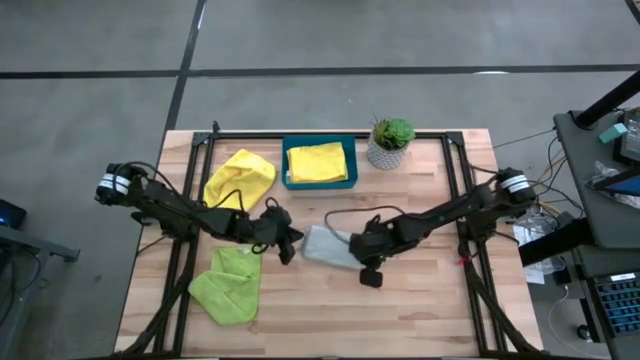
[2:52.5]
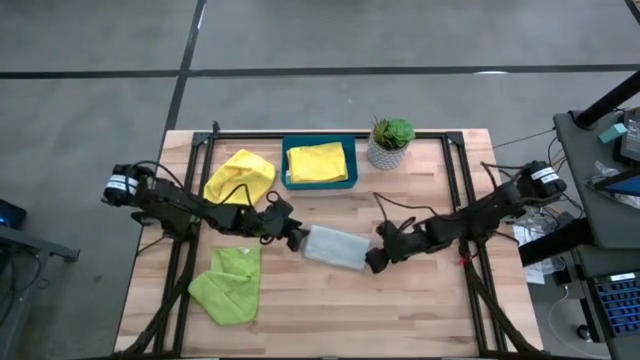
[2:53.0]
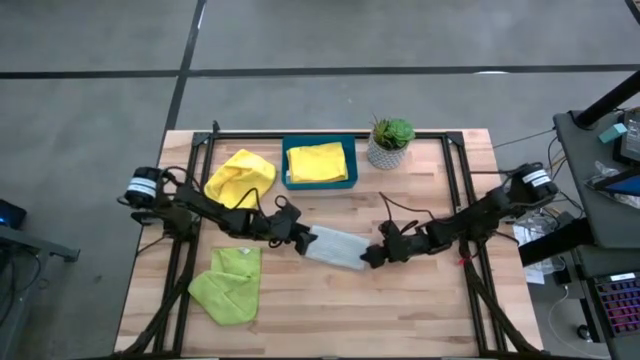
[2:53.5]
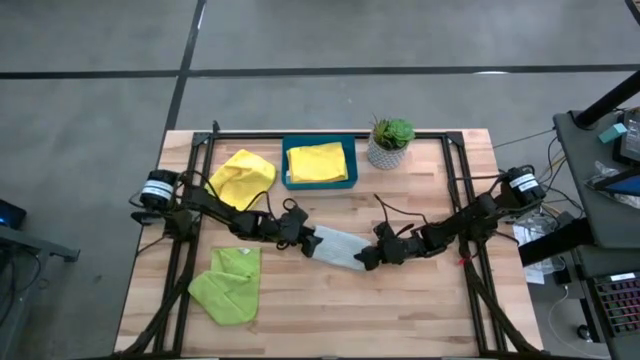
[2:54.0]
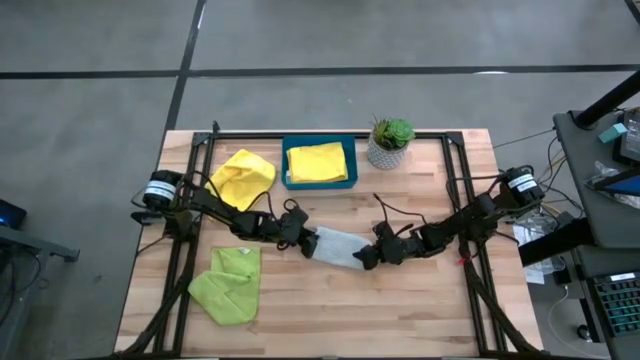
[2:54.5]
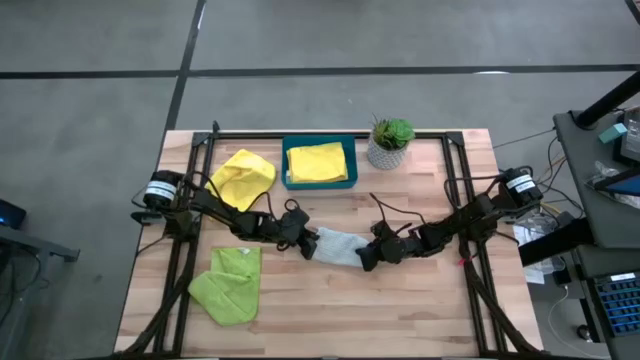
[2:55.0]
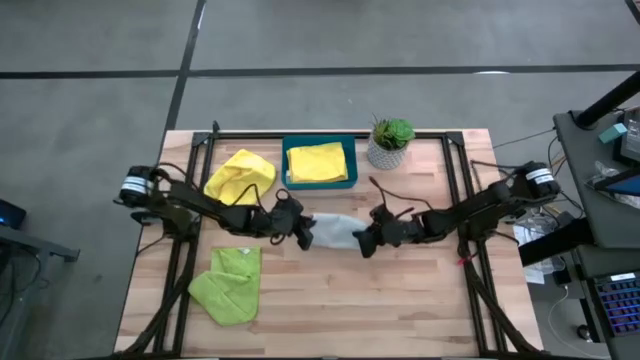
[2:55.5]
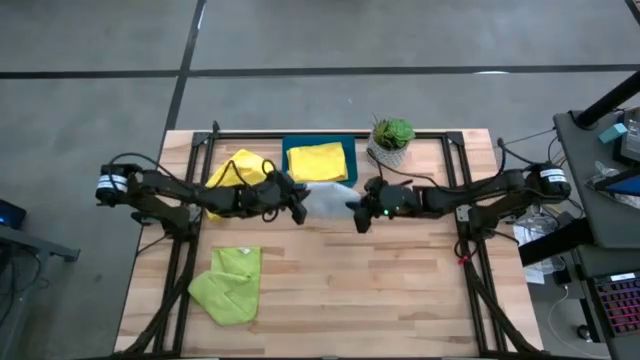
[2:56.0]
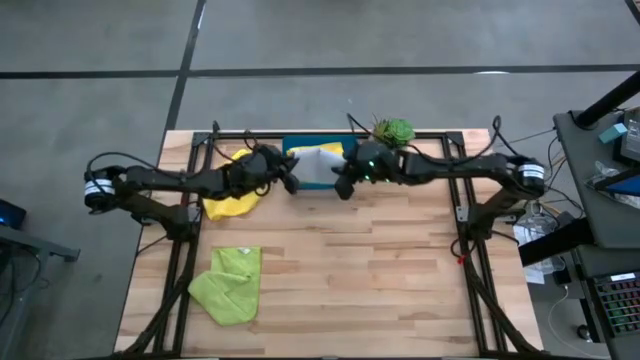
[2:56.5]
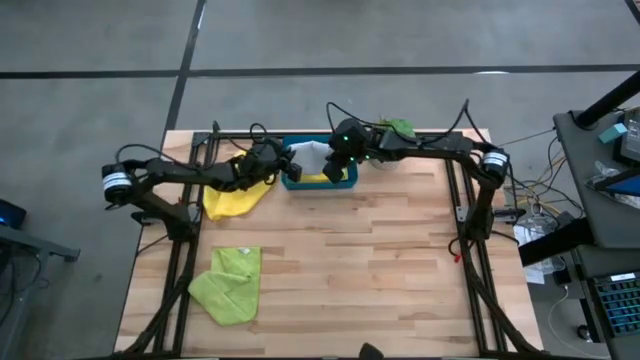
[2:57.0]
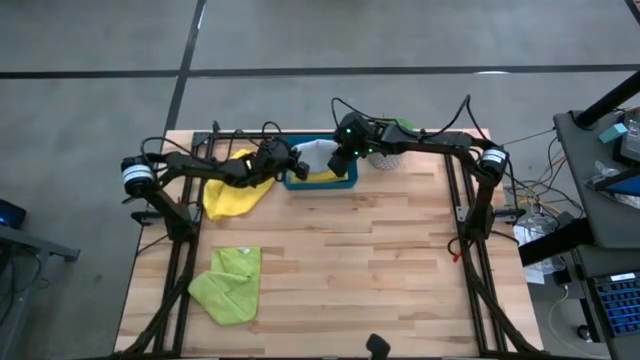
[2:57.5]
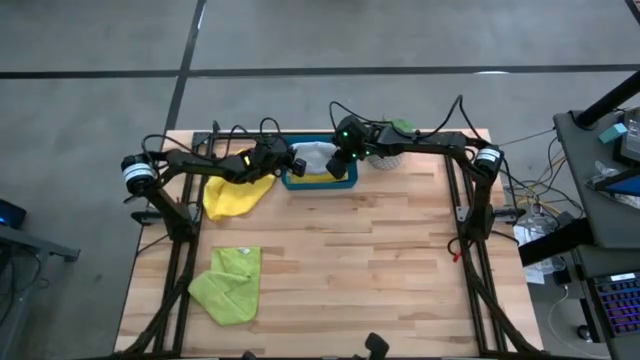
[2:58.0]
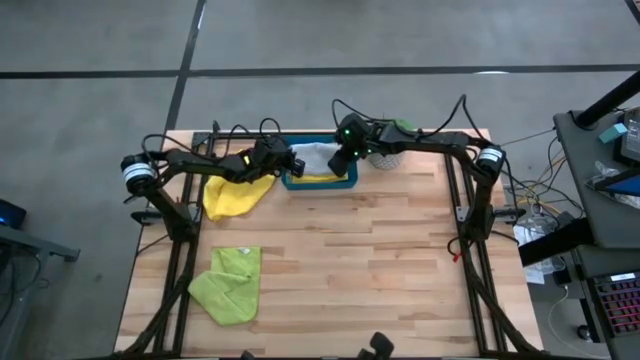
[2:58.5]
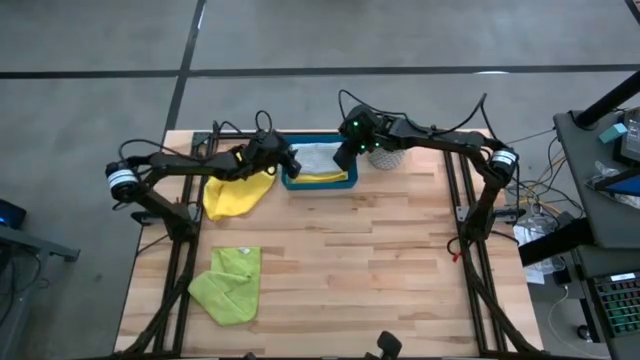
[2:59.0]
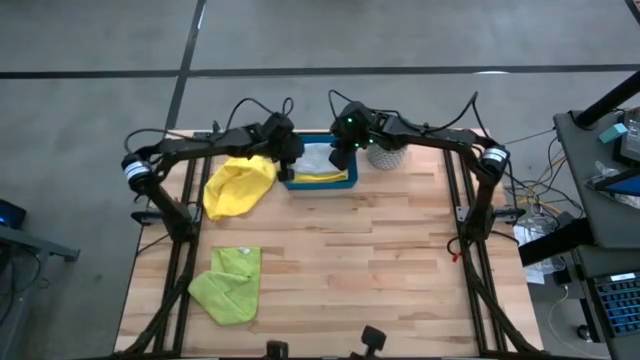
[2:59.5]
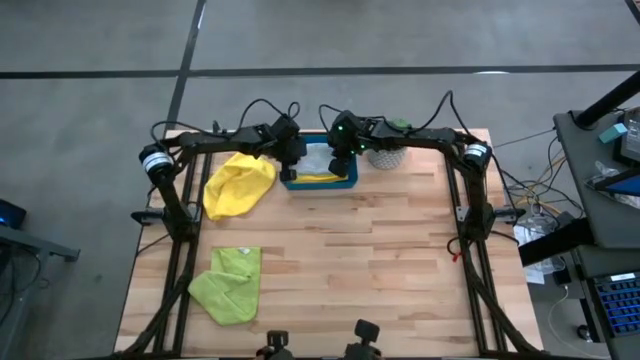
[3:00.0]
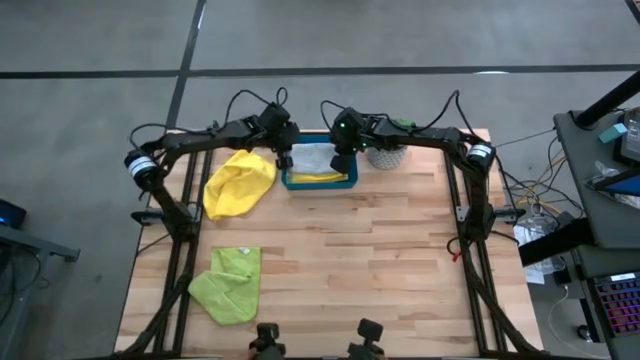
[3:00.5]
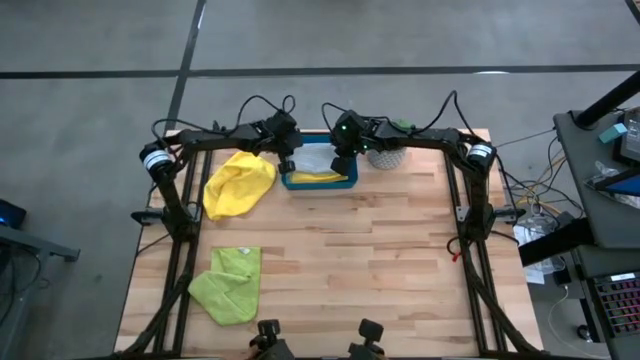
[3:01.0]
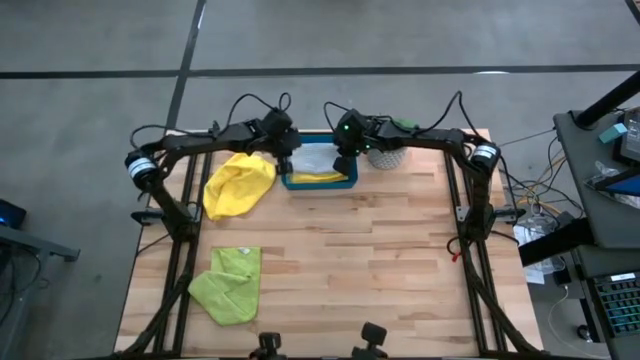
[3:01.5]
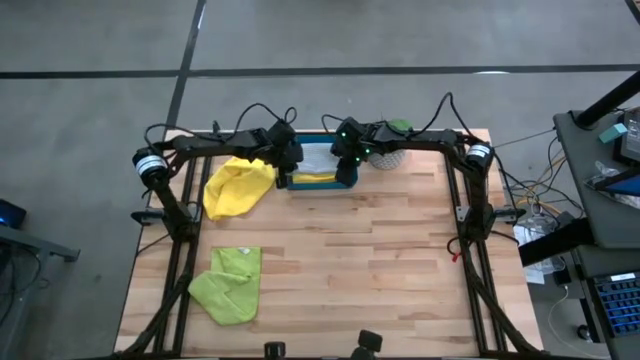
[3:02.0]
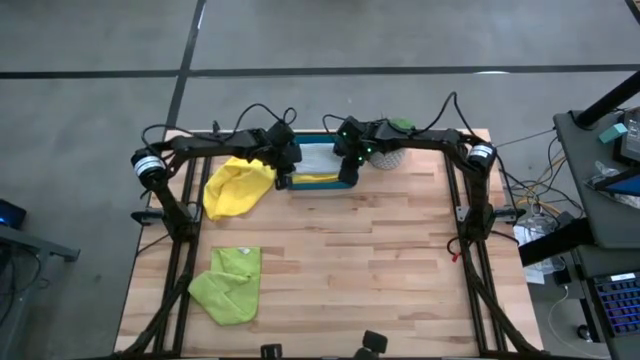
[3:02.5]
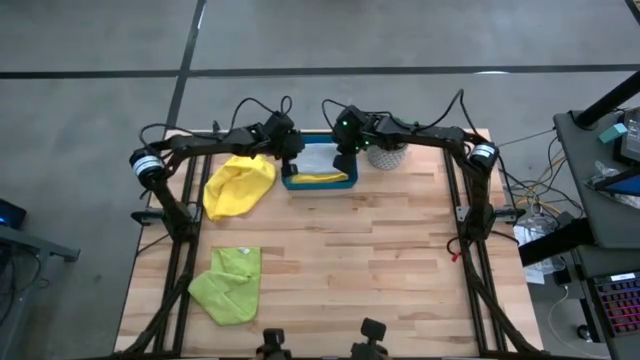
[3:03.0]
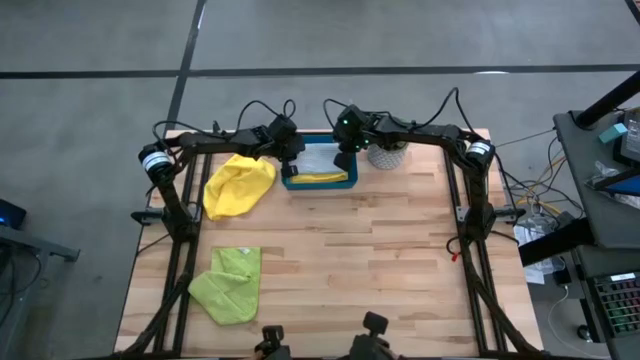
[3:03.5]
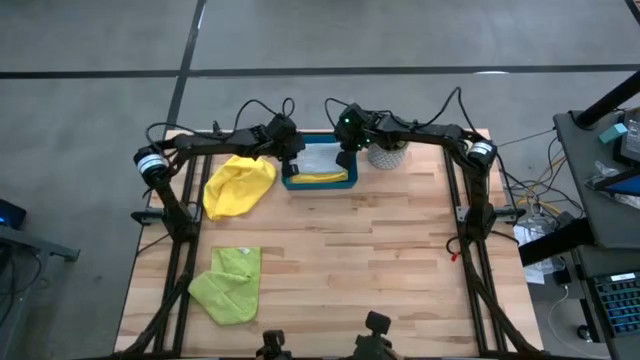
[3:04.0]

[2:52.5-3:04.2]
Task: Fold microfiber towels
Stack the folded gray microfiber cloth on top of the yellow microfiber cloth

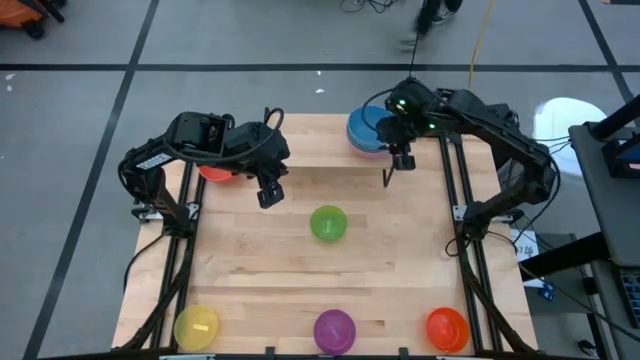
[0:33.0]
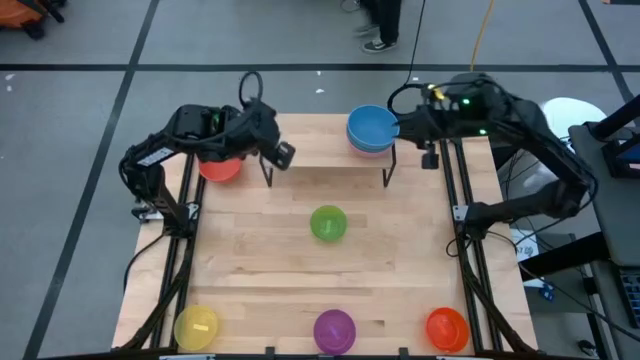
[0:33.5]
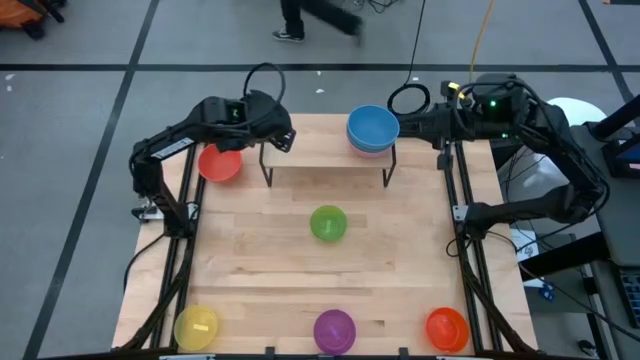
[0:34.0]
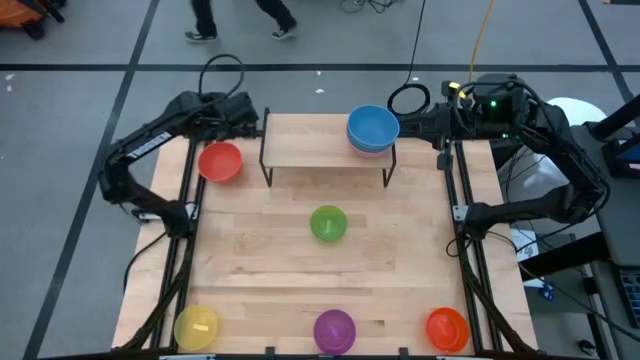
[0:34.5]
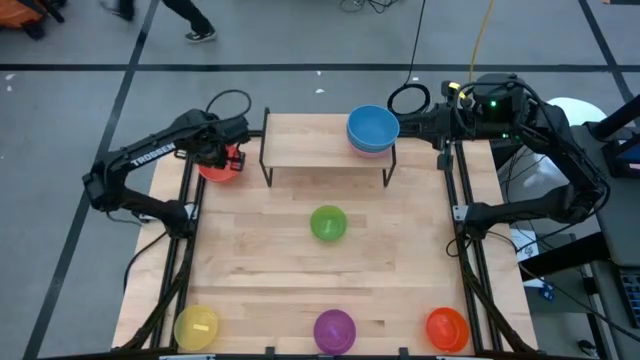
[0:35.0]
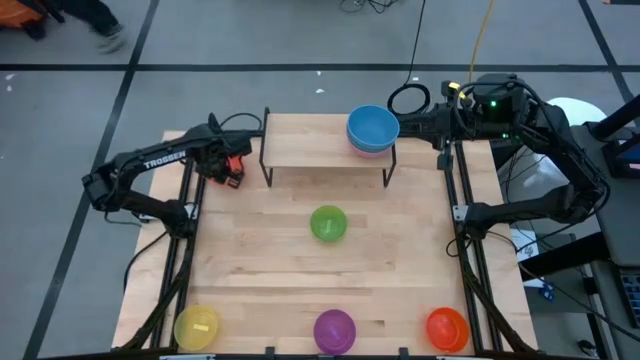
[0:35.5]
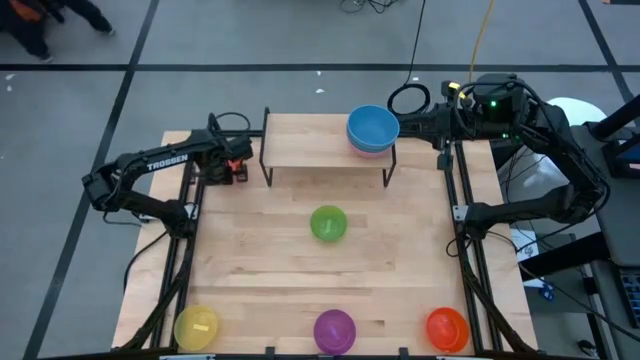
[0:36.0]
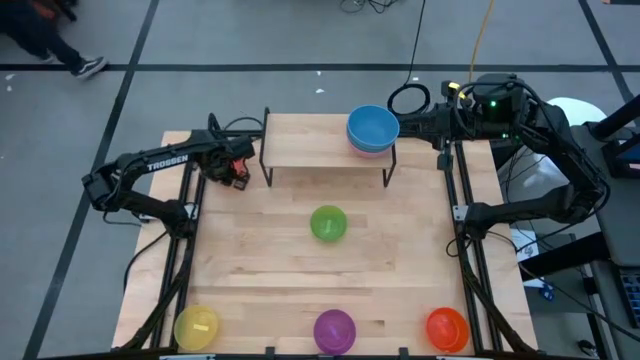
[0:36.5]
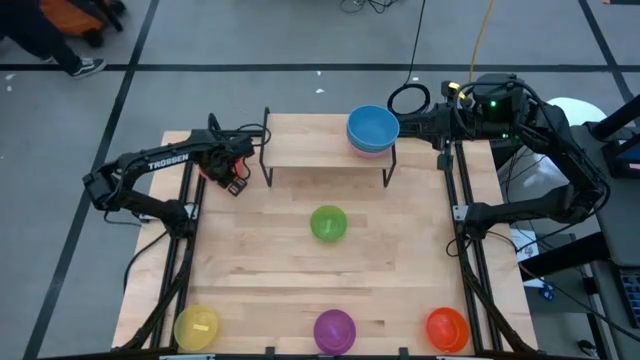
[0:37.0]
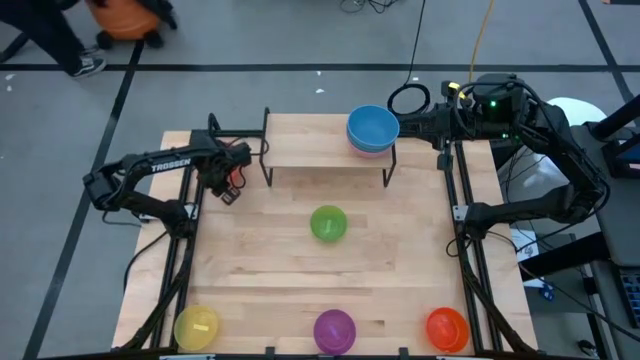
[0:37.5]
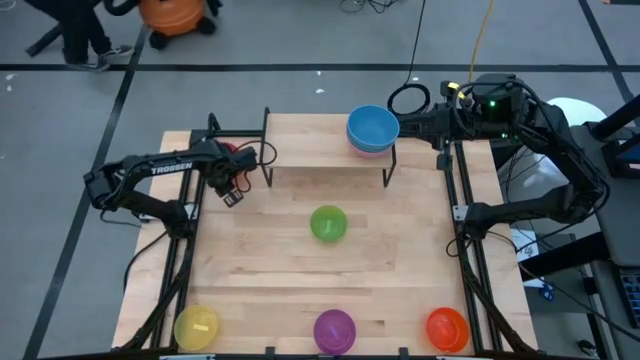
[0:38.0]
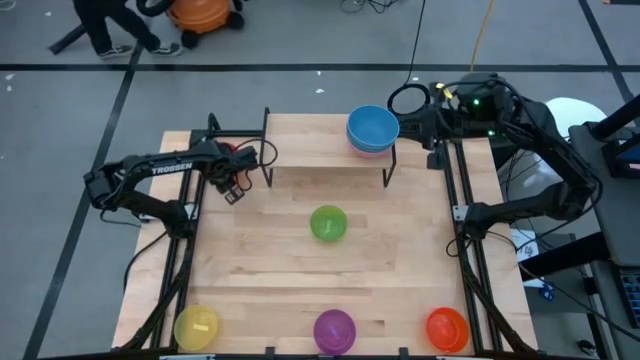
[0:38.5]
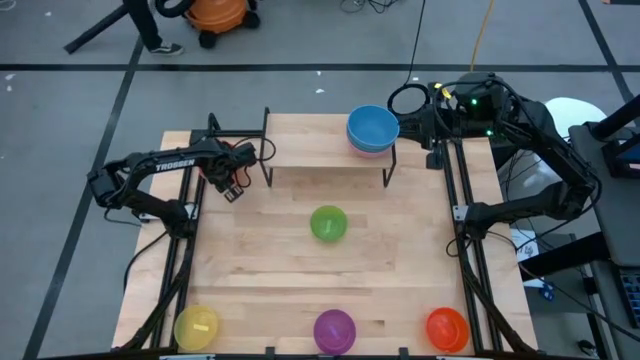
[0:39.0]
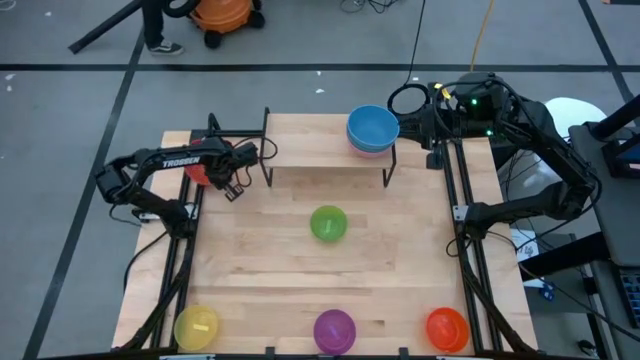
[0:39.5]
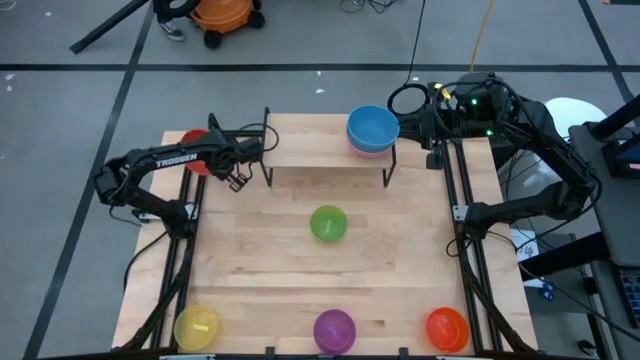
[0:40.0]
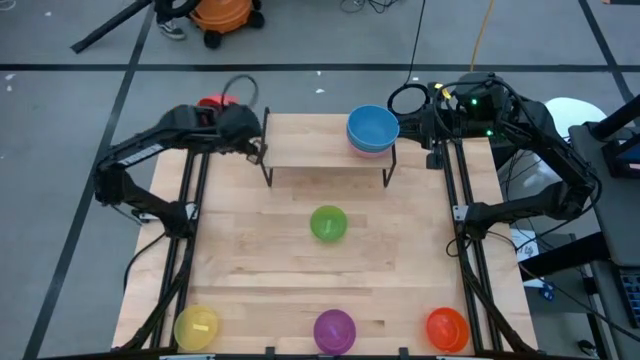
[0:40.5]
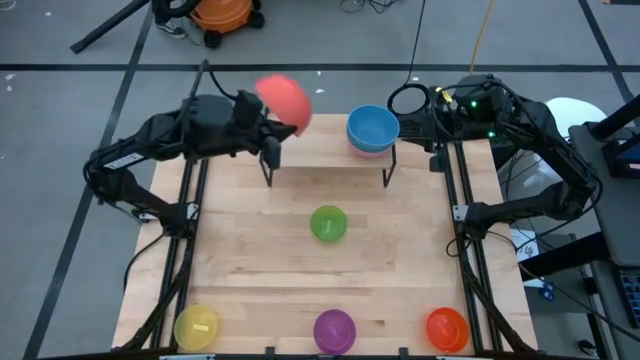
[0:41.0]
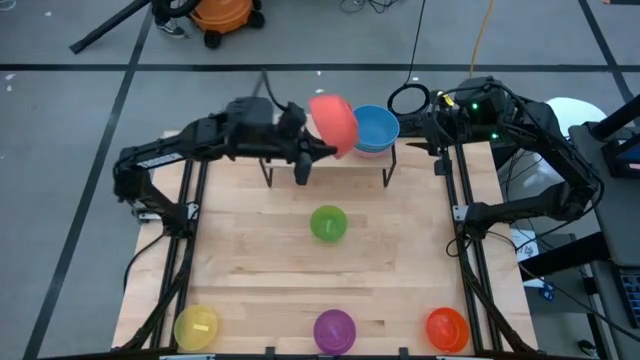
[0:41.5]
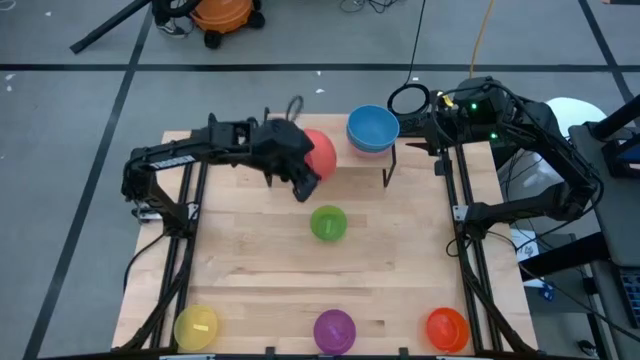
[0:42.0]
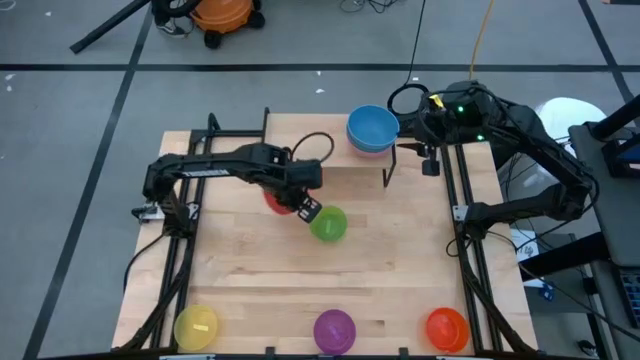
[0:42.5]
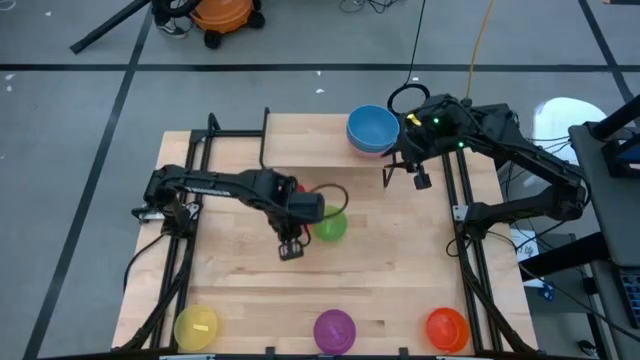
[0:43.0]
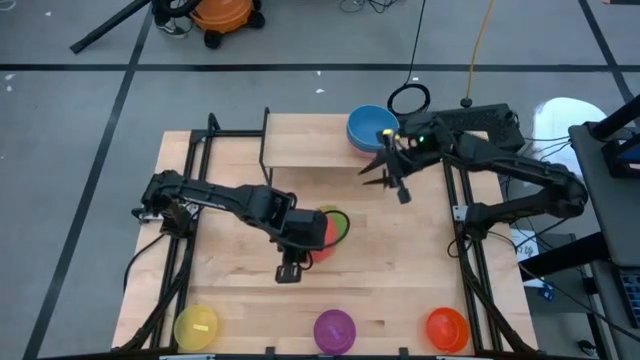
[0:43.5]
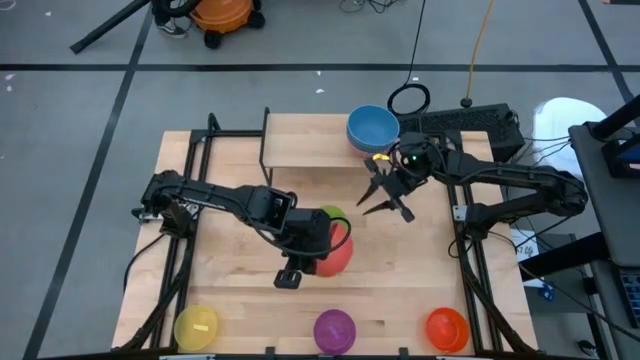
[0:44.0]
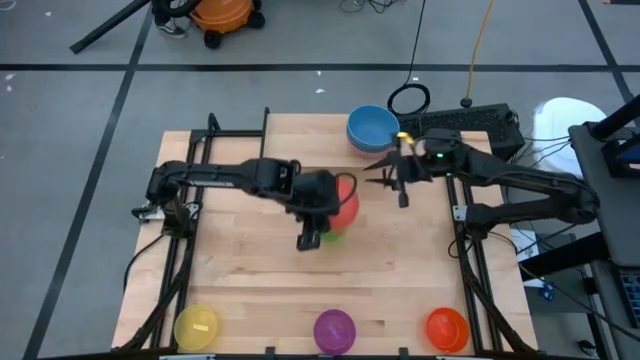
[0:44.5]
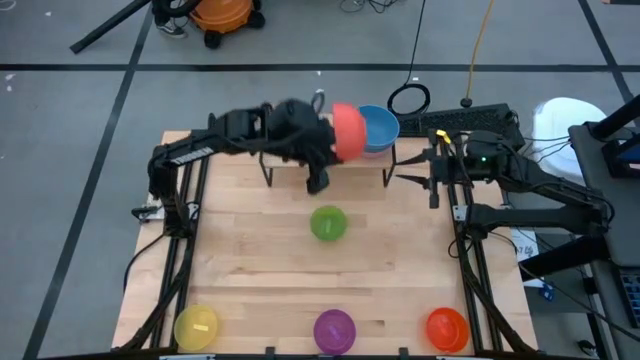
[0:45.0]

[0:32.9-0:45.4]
Task: Place and stack bowls onto a shelf
Stack the top orange bowl on top of the blue bowl on the shelf
